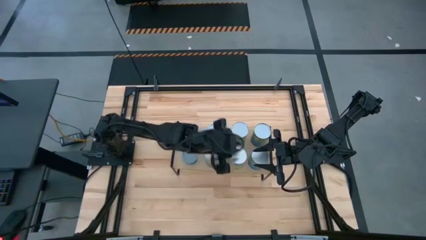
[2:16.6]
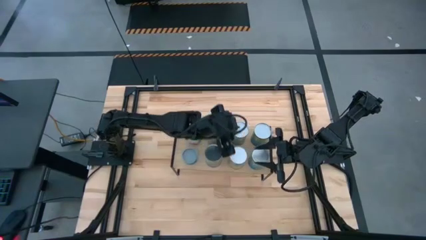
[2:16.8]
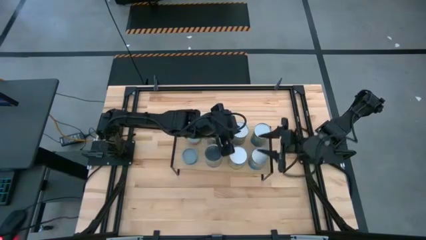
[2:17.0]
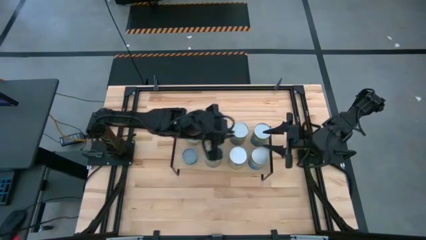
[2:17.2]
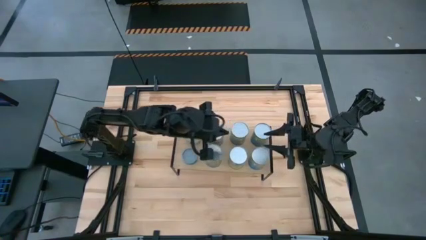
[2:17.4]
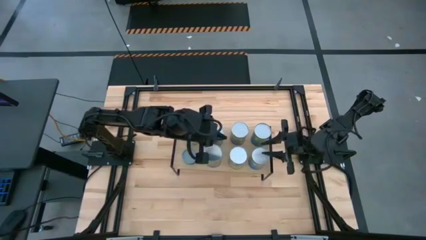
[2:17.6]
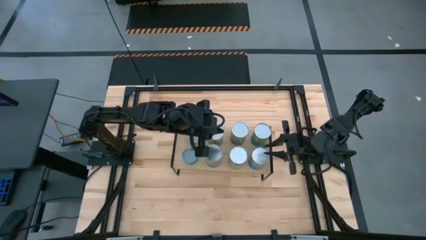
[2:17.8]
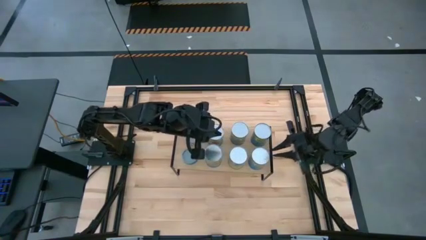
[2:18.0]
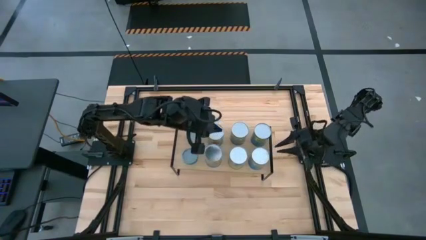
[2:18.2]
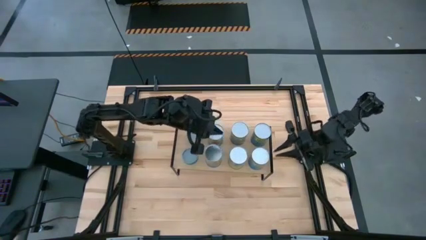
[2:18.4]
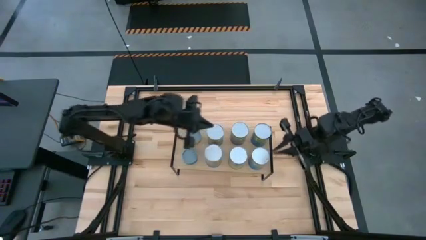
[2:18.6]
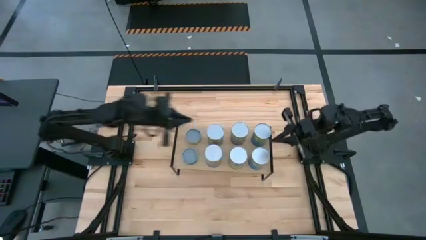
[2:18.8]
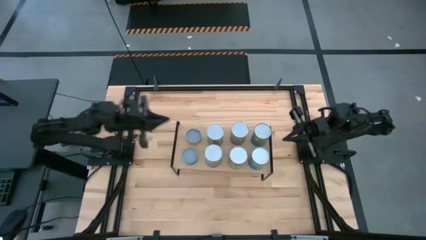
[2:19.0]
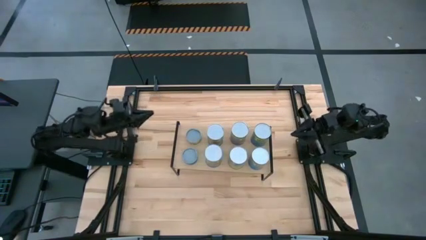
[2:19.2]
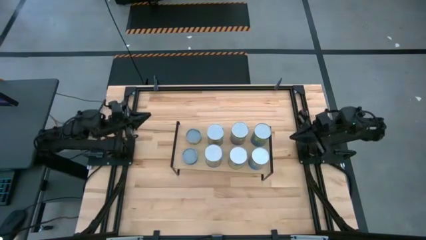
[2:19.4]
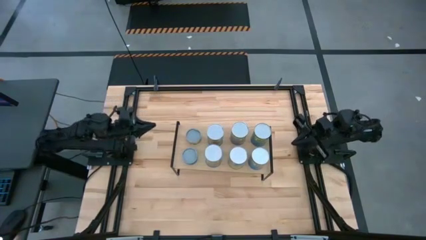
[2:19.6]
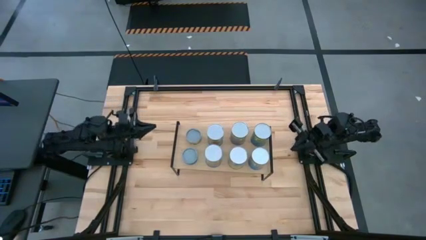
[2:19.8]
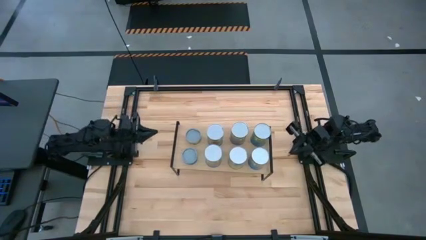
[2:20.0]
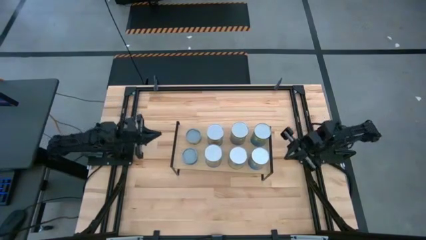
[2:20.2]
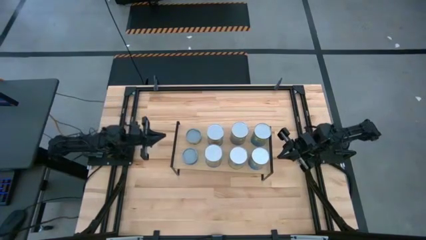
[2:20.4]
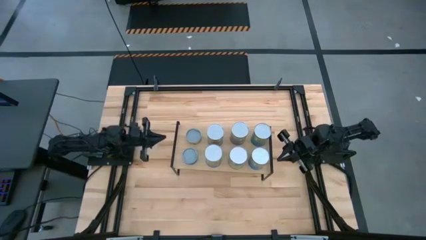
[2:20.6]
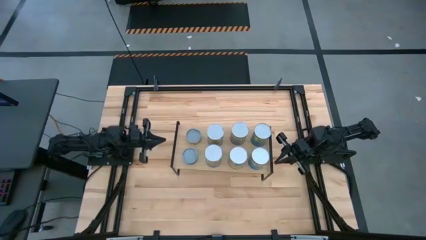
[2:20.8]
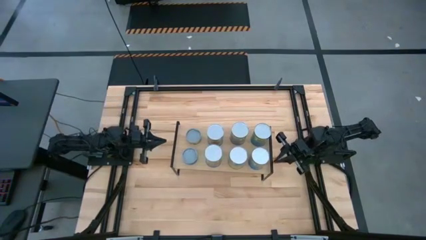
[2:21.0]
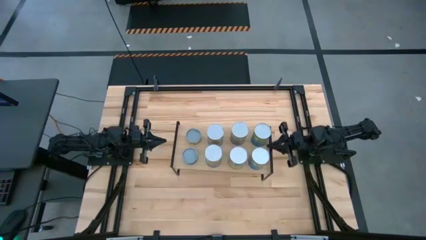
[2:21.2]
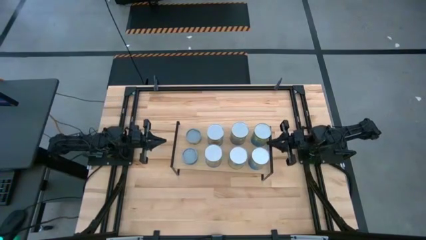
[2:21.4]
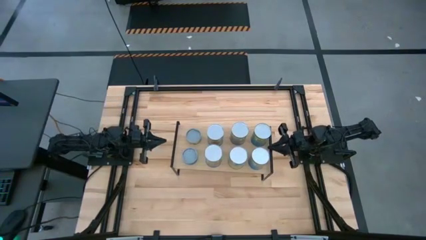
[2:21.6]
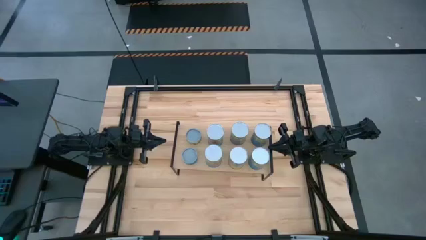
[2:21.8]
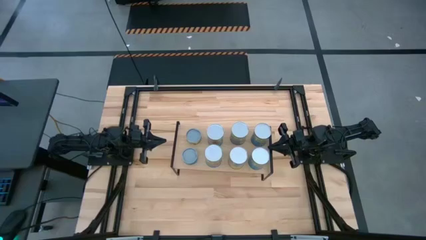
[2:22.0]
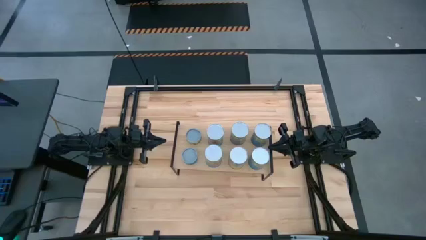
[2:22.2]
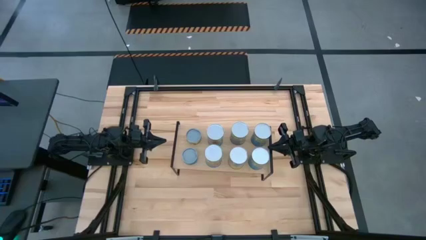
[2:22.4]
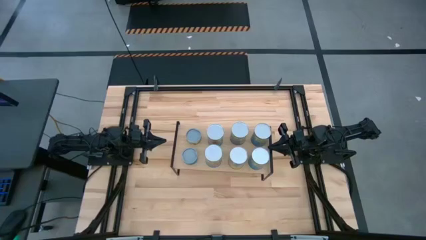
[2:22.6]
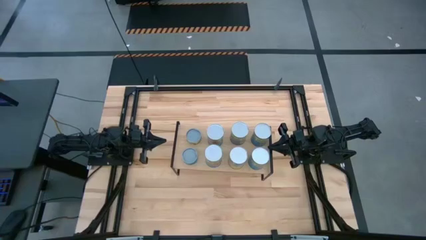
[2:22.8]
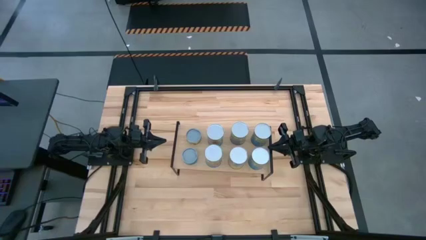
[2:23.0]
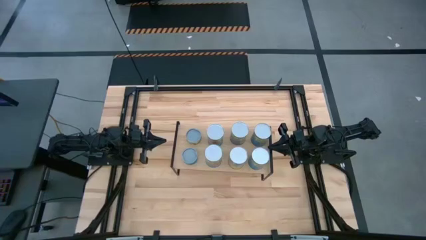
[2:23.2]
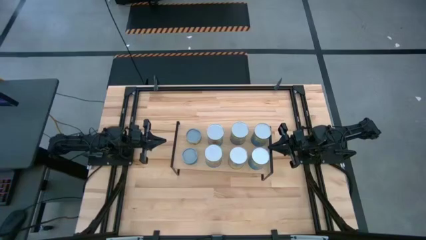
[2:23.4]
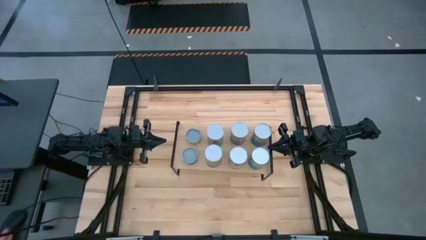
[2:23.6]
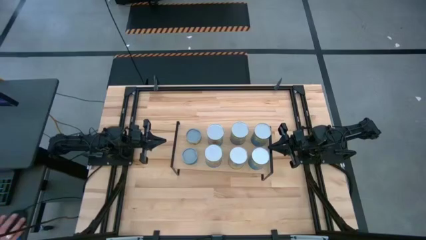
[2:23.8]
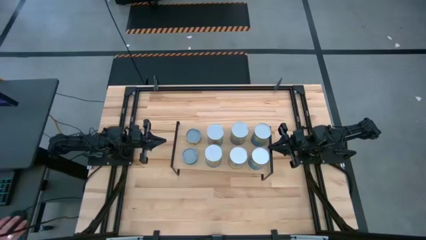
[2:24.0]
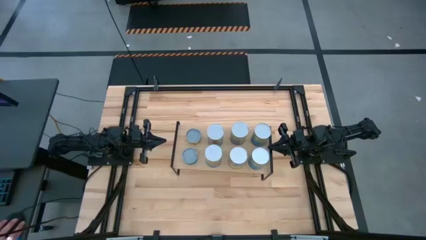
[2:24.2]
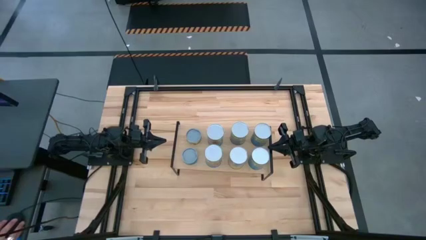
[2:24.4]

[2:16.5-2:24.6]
Task: Pick and place cans onto a shelf
Return to Home Position

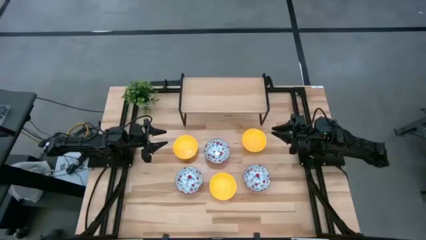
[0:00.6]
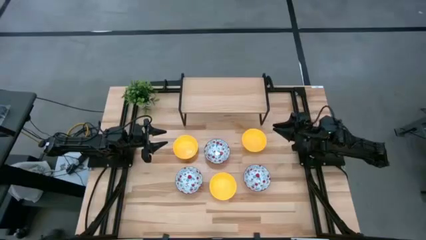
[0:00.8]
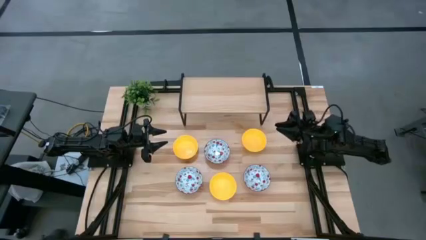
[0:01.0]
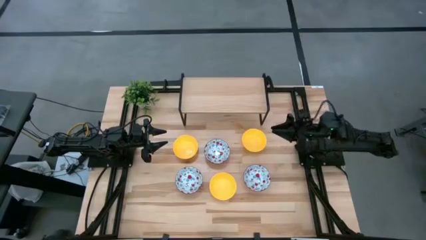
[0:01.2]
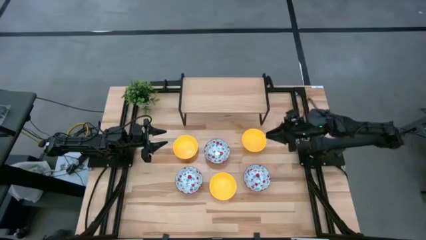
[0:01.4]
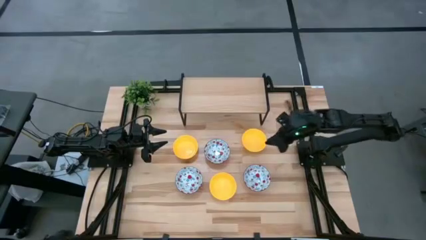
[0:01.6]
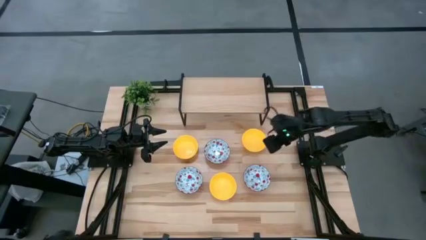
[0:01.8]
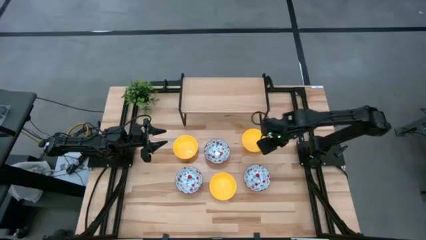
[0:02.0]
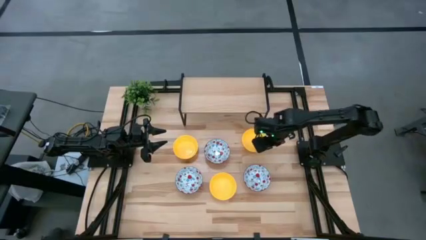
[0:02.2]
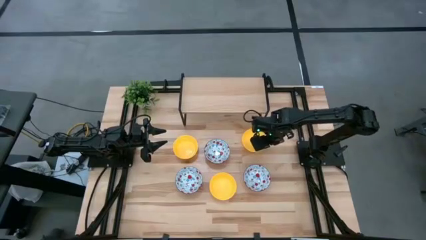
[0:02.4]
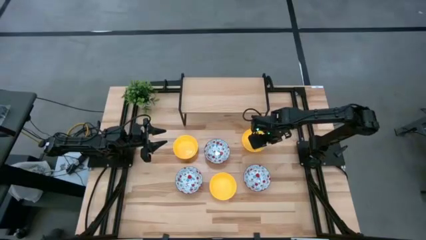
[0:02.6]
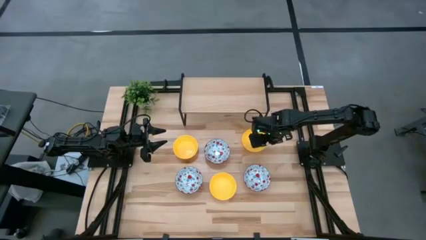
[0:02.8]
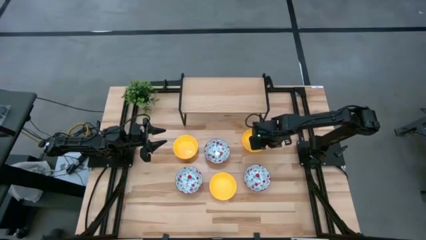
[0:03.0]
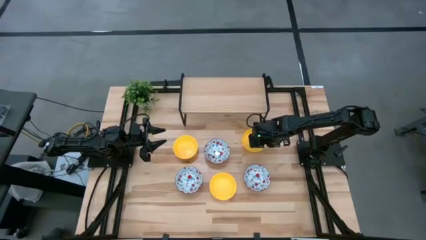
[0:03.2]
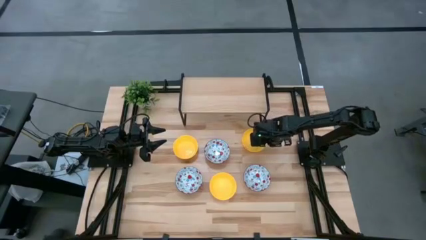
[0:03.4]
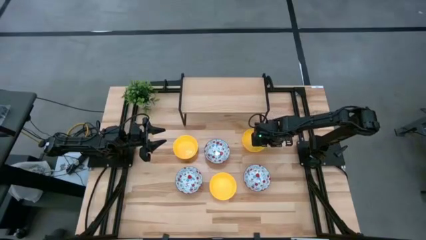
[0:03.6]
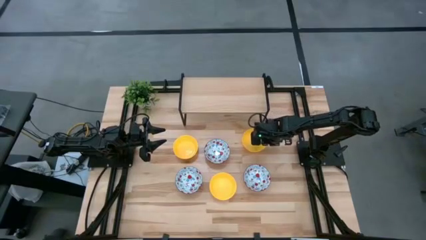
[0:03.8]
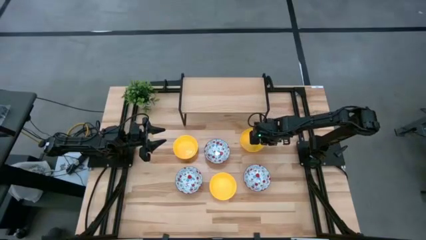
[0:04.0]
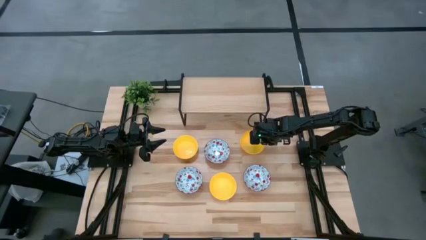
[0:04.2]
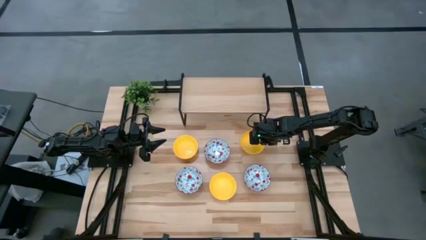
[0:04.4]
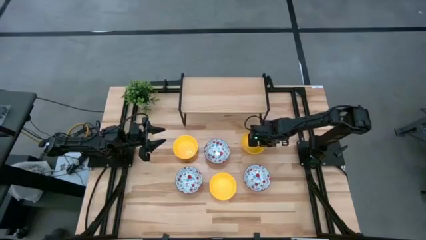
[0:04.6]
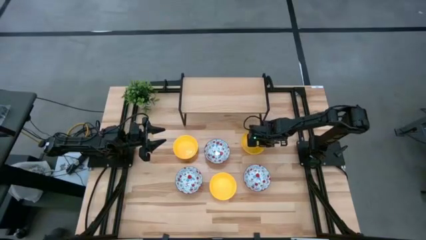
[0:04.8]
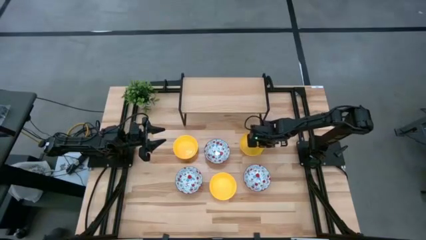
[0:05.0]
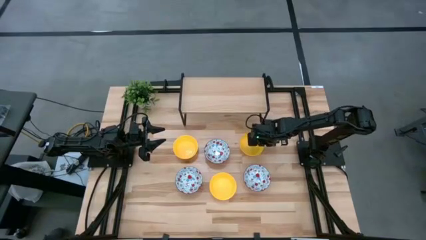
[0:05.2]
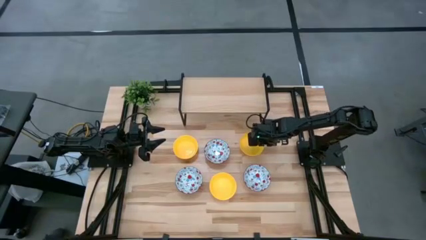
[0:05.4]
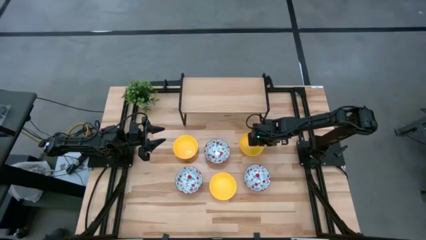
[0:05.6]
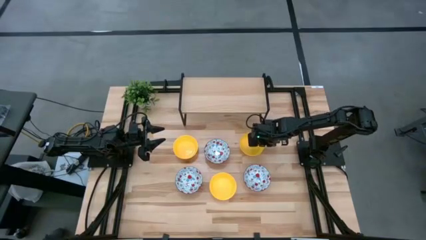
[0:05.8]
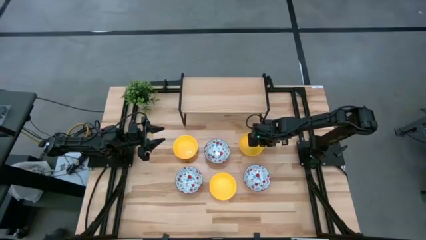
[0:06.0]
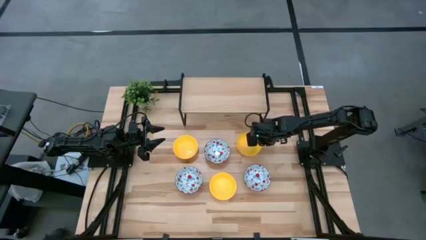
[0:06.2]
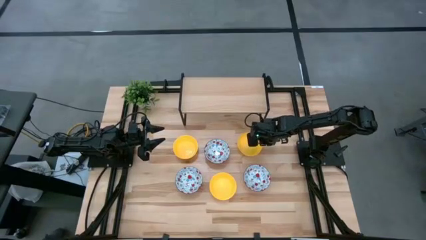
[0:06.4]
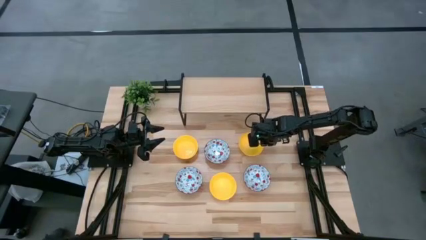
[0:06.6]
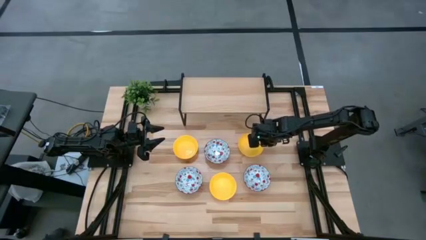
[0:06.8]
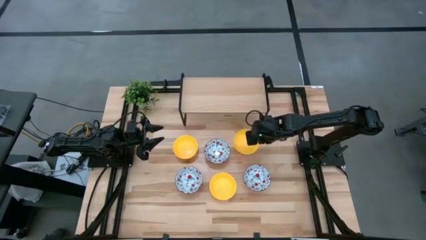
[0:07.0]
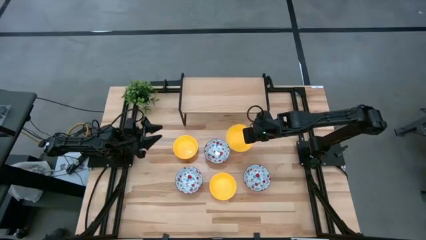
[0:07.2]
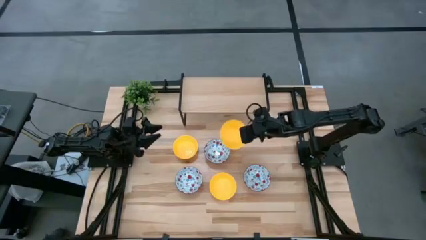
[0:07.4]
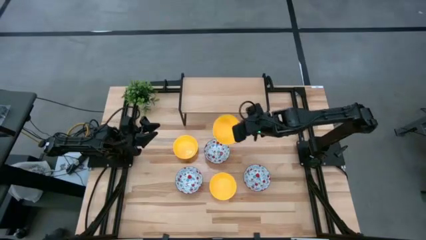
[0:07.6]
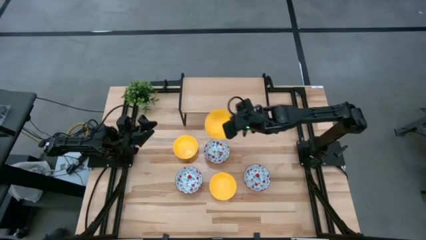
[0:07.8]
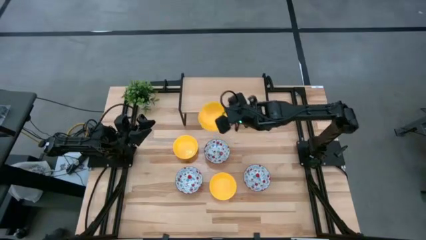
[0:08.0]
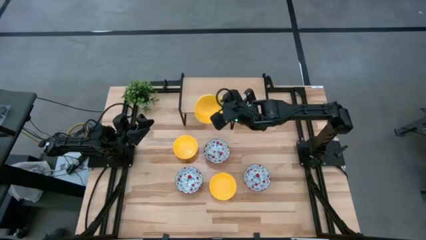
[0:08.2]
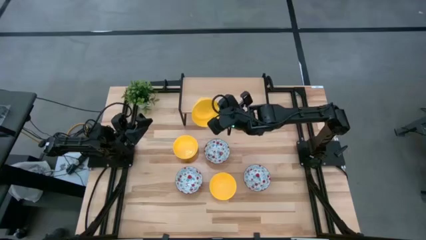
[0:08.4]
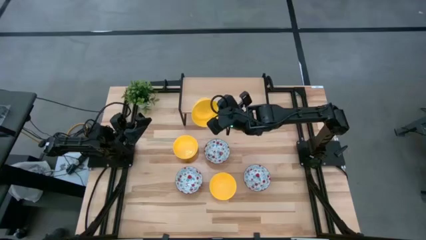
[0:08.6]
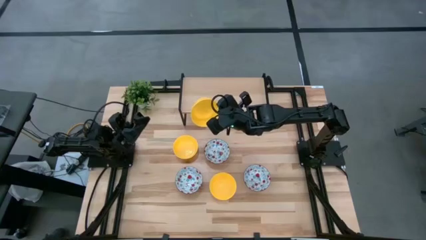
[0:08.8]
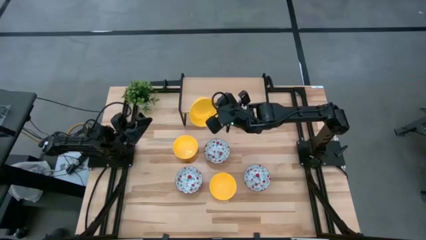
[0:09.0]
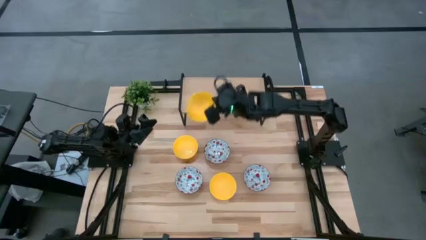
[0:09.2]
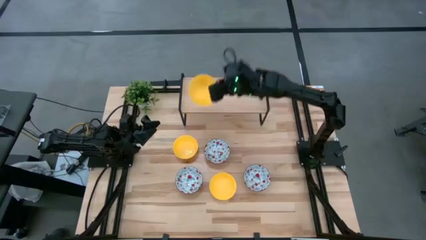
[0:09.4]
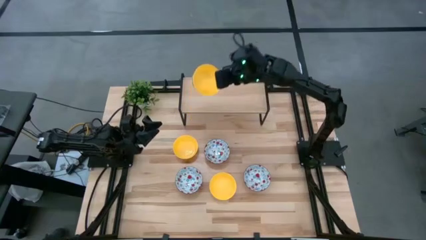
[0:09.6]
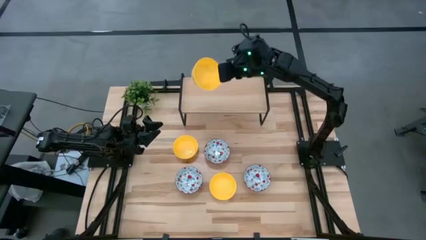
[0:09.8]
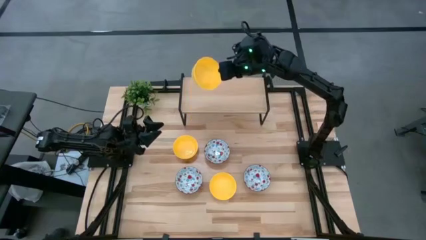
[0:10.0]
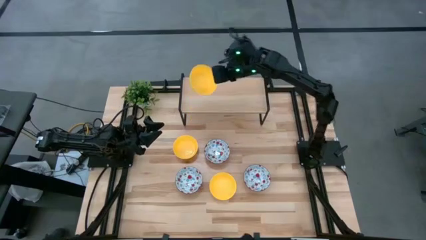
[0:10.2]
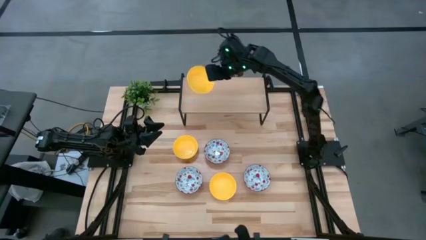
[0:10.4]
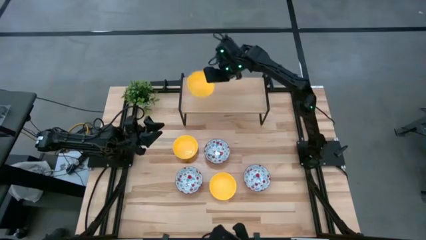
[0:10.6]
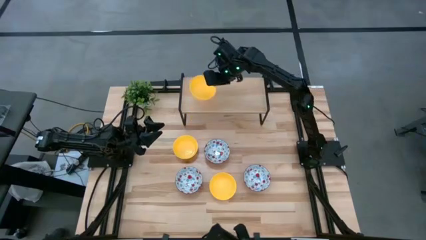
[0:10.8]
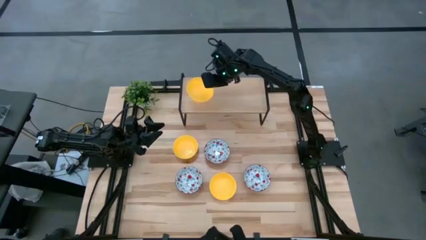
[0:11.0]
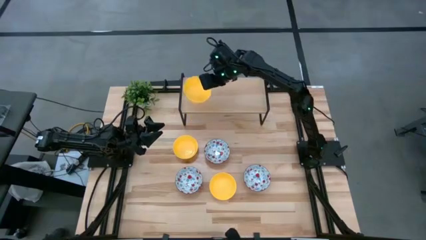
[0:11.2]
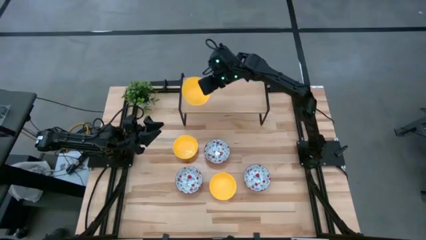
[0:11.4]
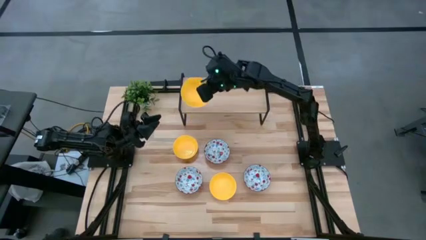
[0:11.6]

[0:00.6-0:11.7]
Task: Pick & Place Mini bowls
Put the top right yellow bowl on the shelf
